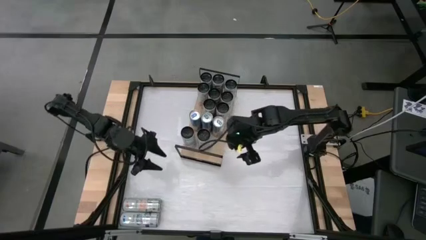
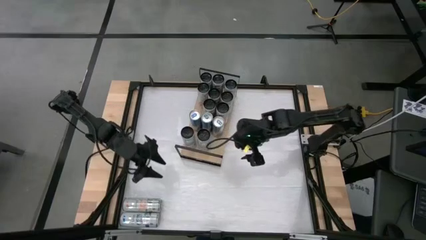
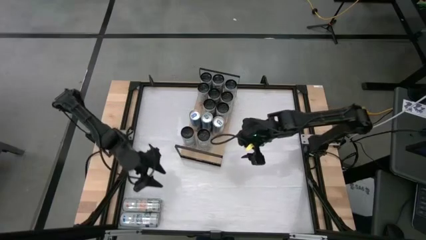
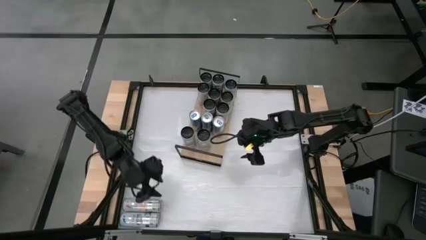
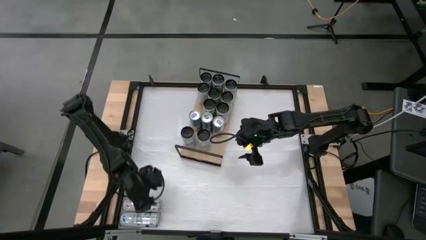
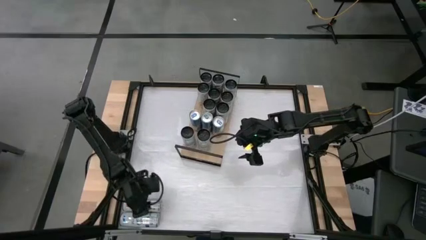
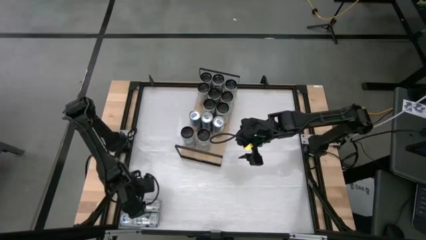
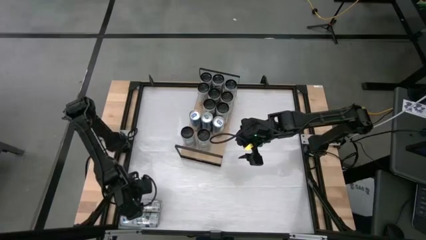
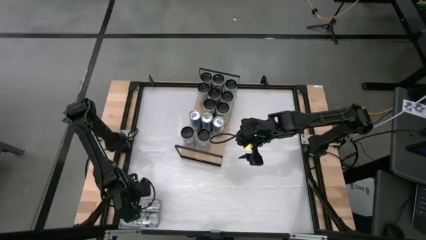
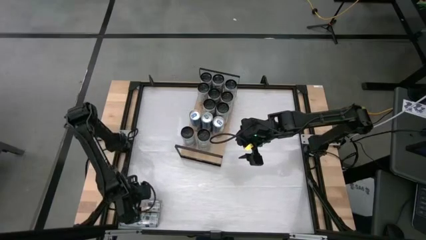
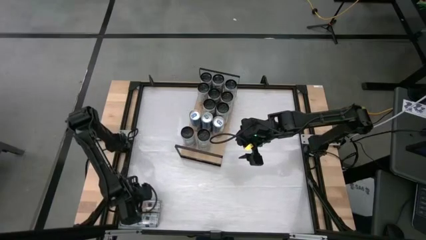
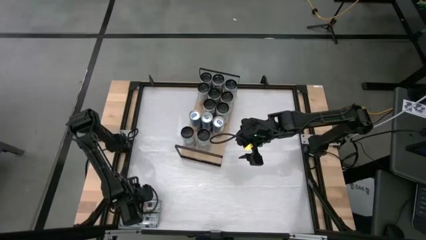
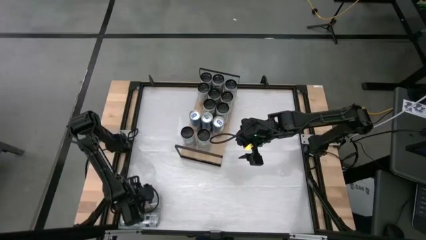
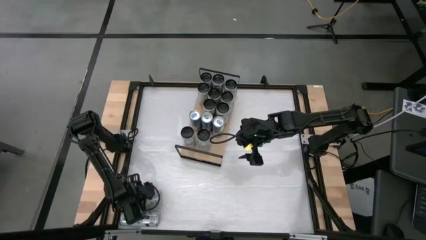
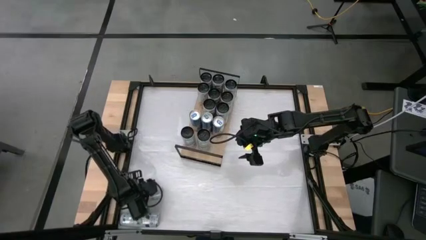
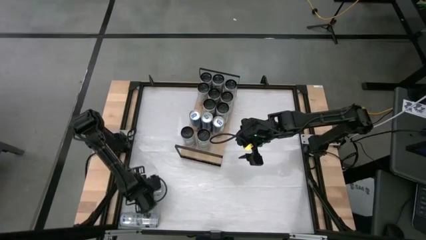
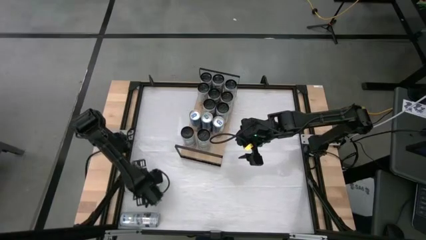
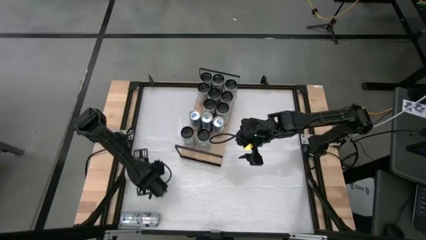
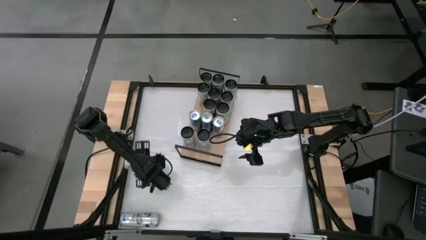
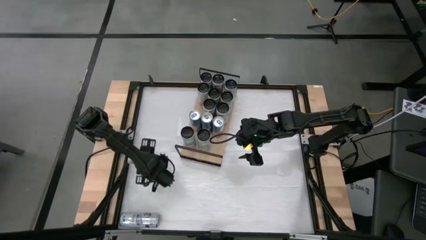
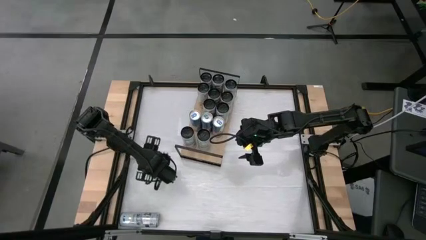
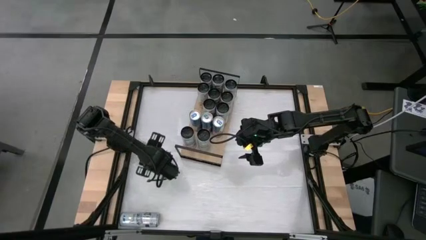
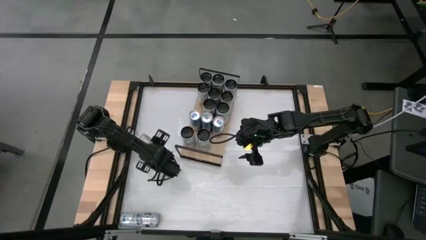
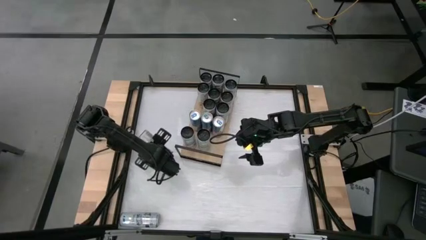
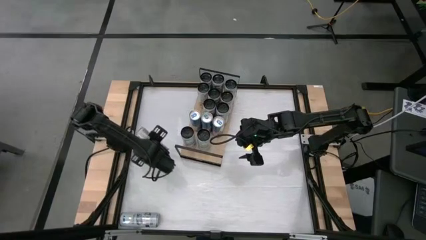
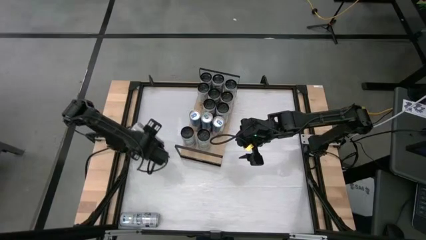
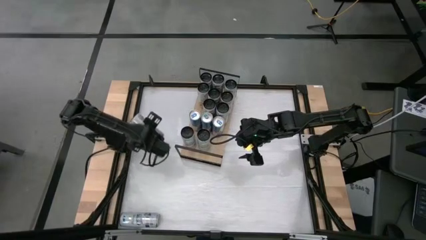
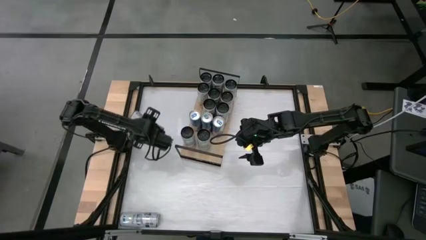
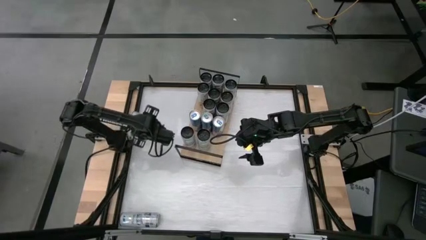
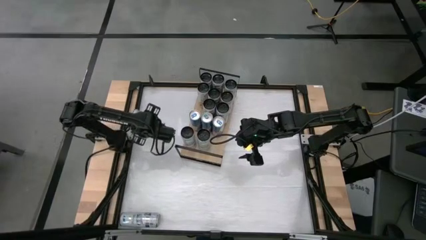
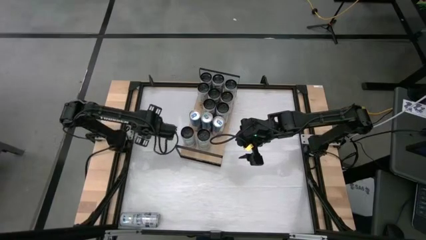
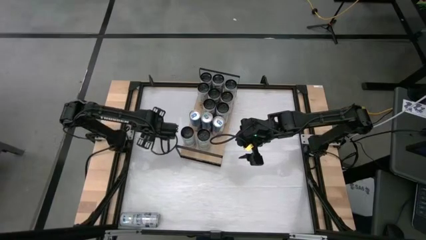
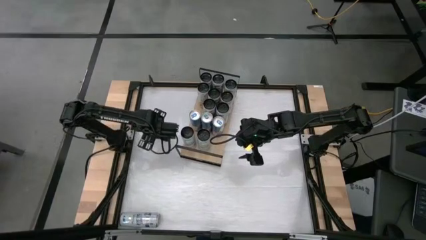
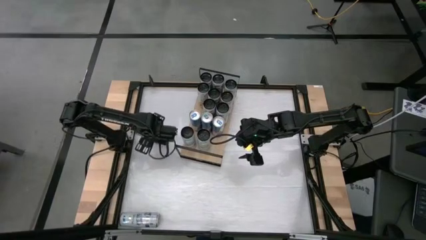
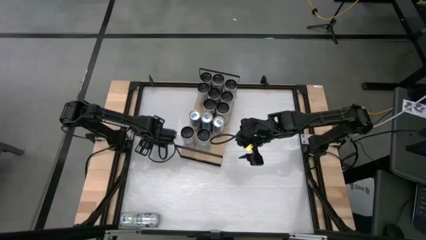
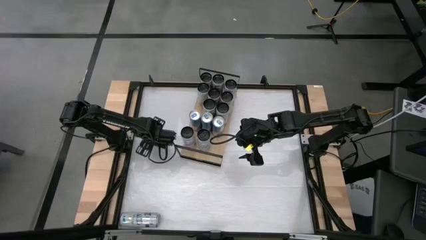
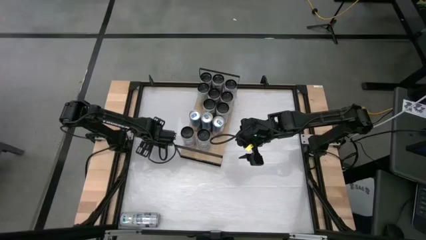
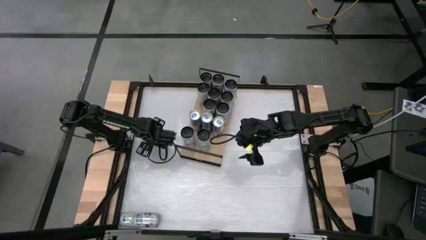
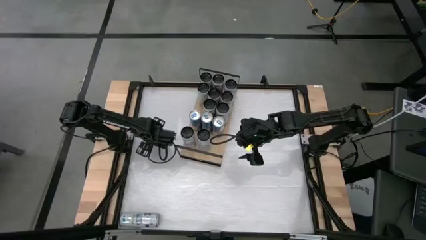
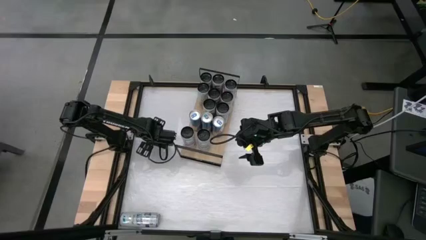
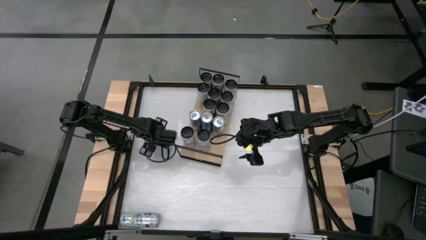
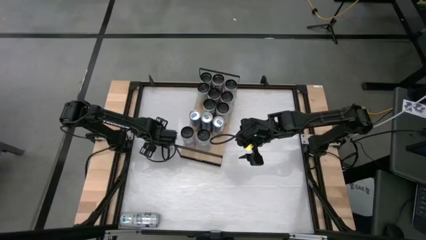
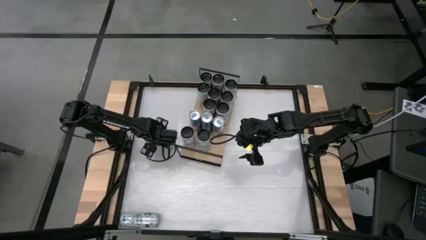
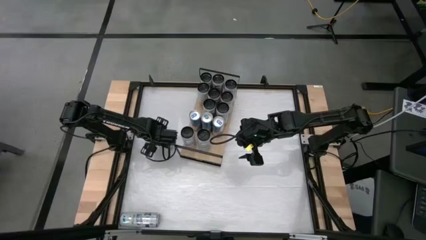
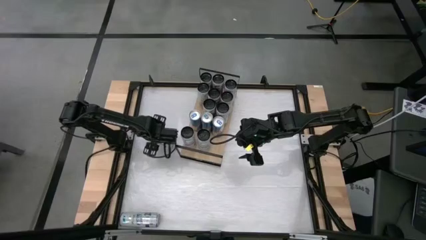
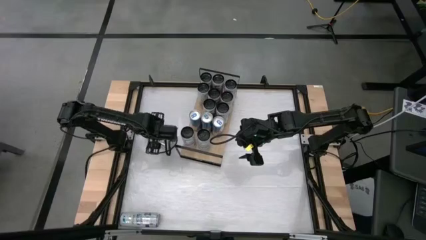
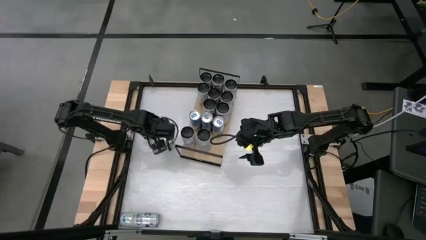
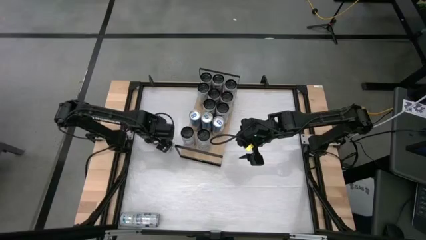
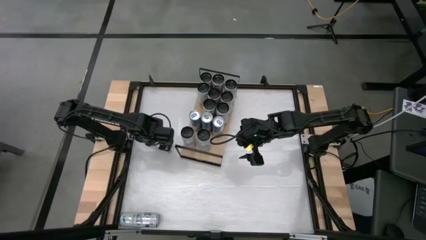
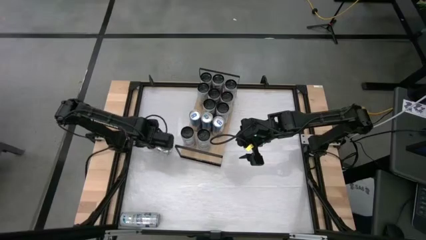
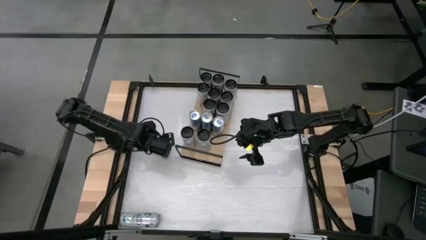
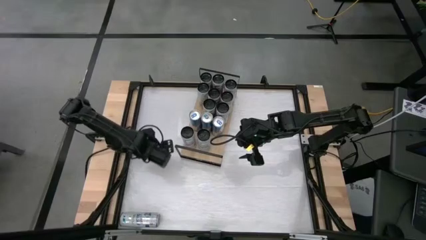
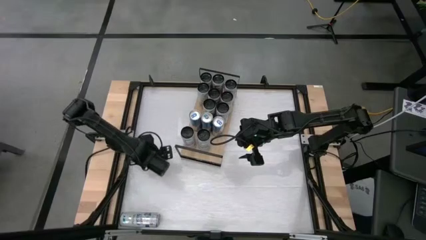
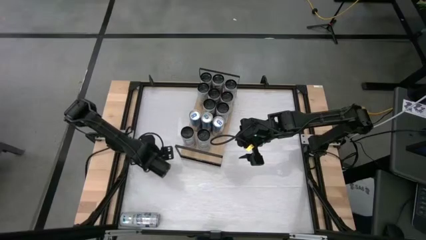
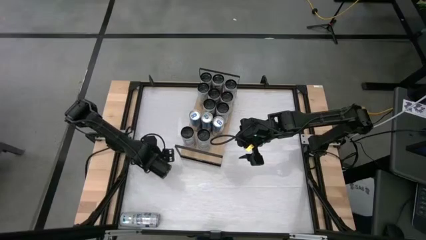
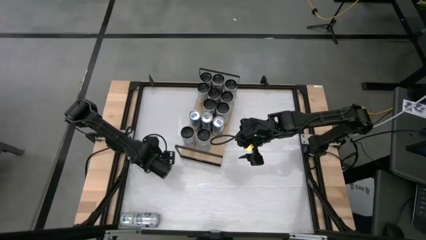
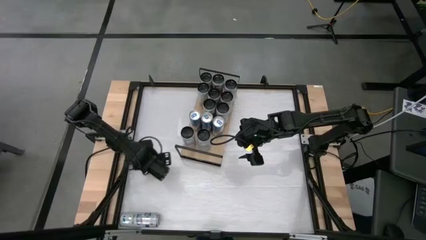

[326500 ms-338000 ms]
Task: Place canned beverage on shelf
Move the orange soda can to the middle left of the table

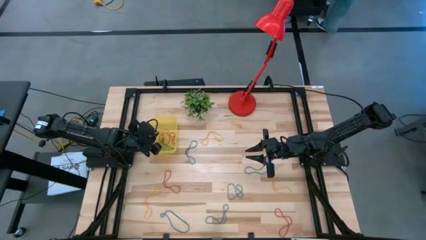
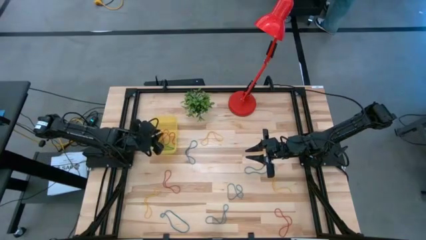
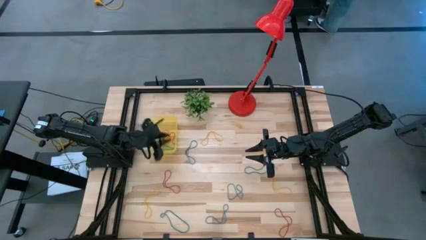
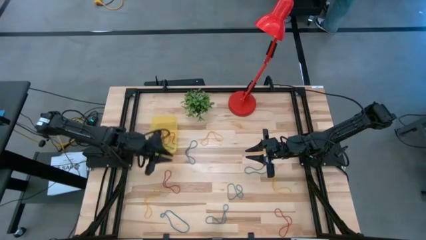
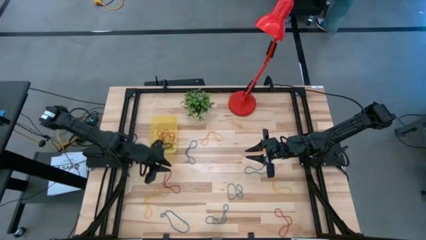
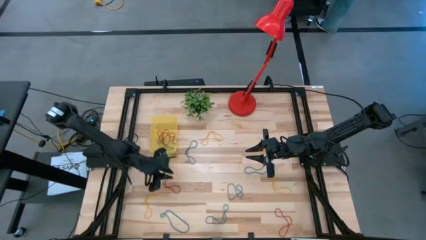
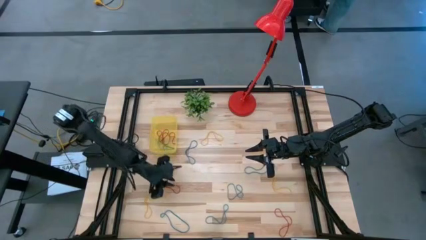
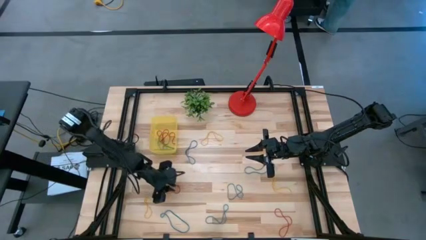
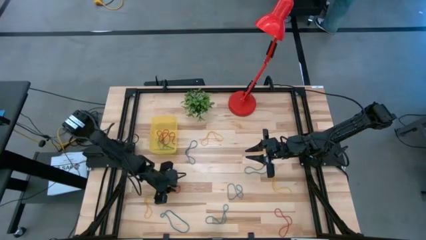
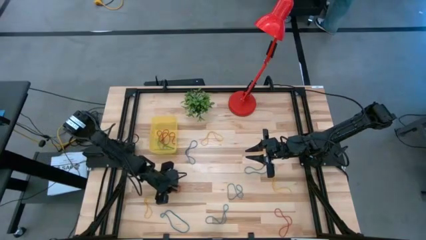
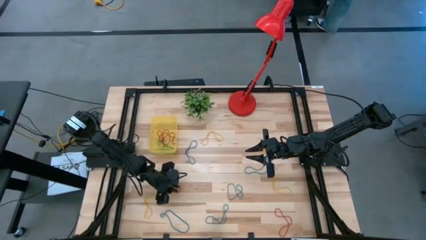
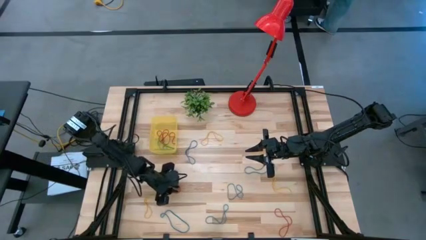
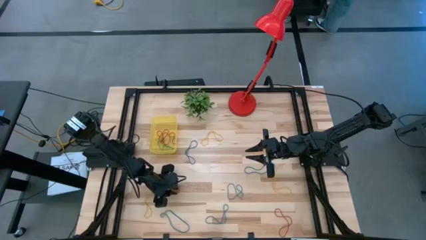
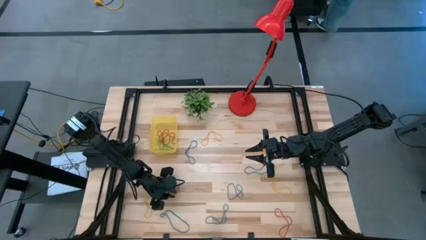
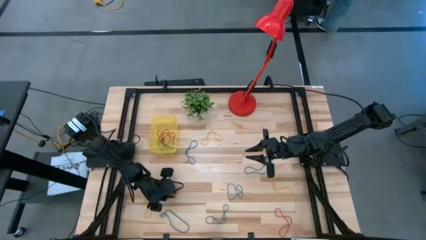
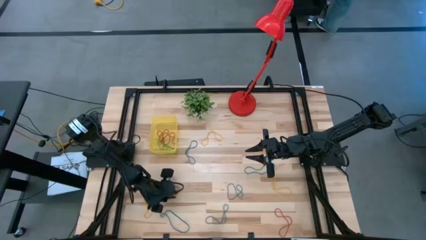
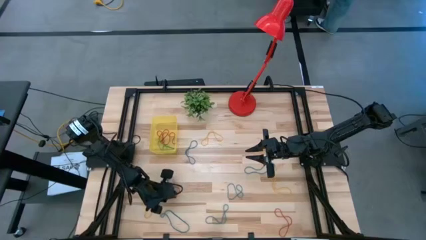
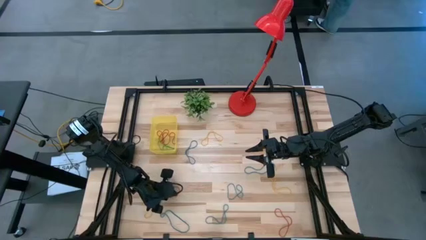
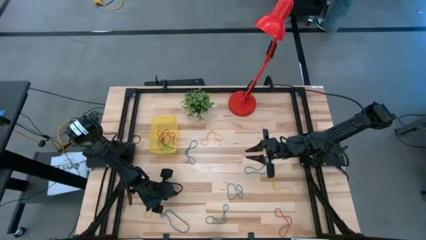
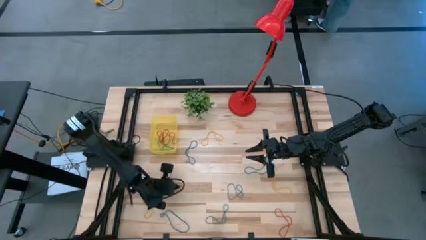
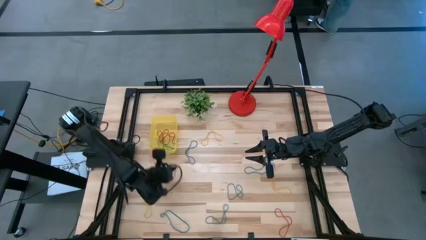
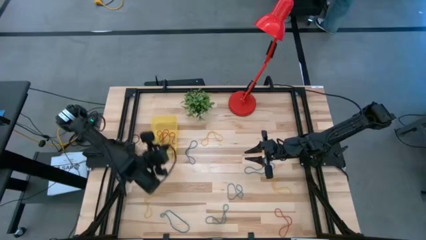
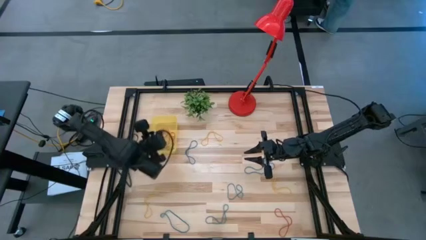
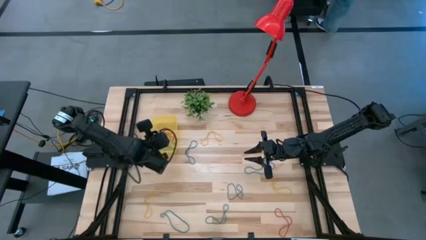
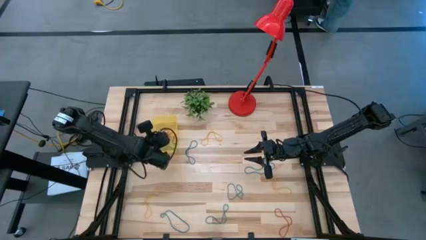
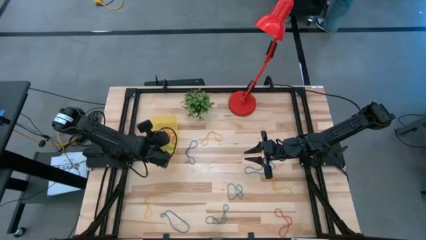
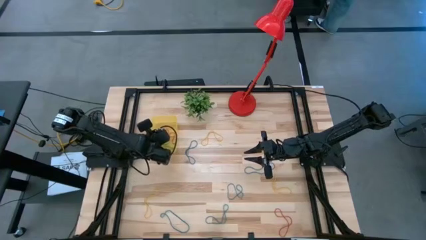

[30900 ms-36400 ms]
Task: Pick and place items into bin
Put the red rubber band into the yellow bin
